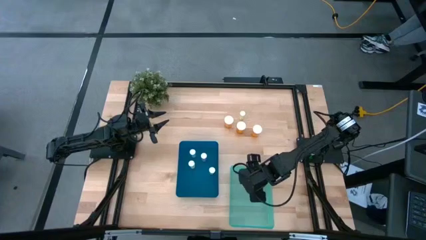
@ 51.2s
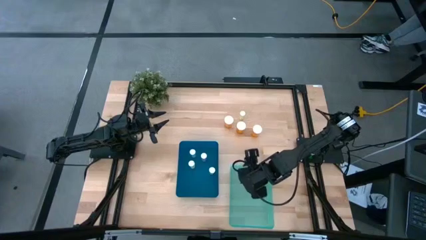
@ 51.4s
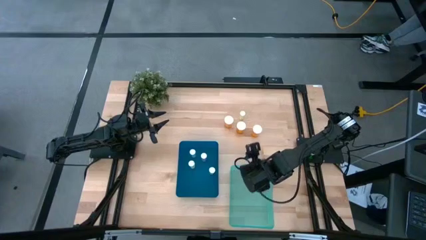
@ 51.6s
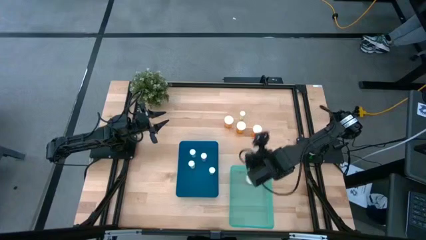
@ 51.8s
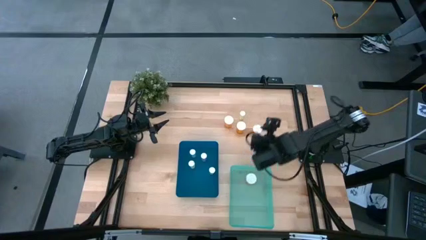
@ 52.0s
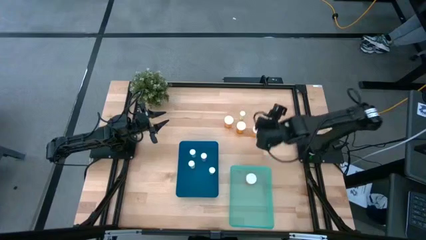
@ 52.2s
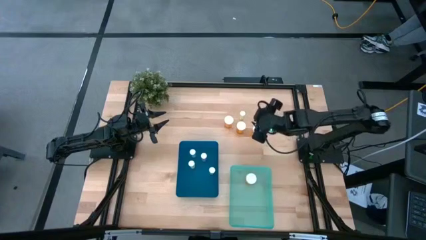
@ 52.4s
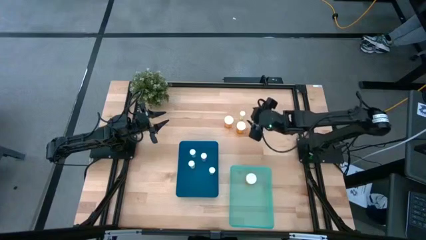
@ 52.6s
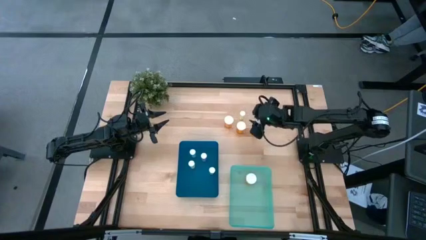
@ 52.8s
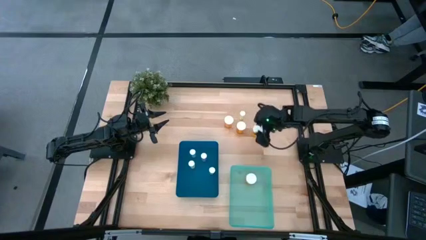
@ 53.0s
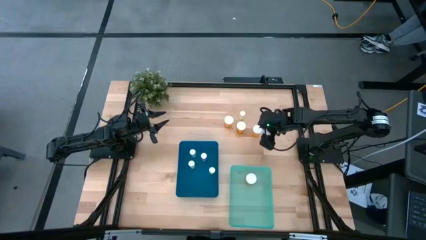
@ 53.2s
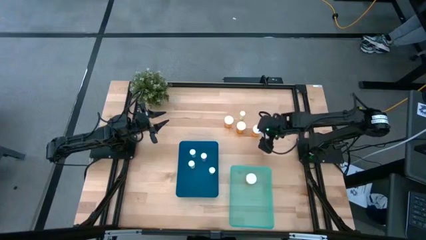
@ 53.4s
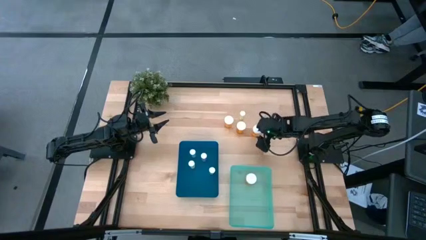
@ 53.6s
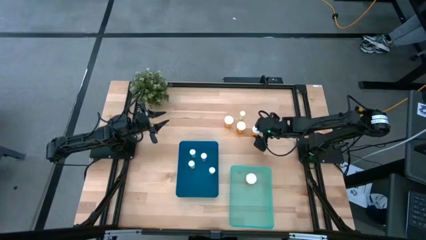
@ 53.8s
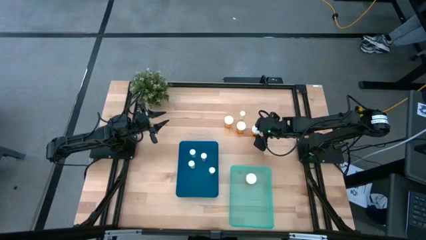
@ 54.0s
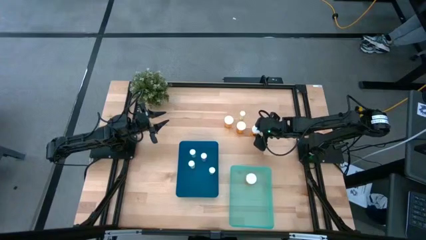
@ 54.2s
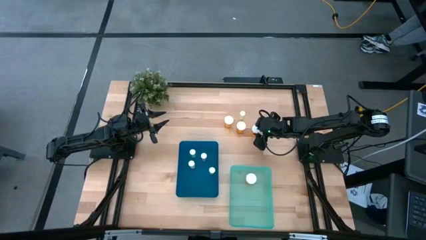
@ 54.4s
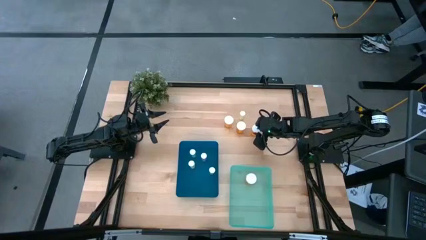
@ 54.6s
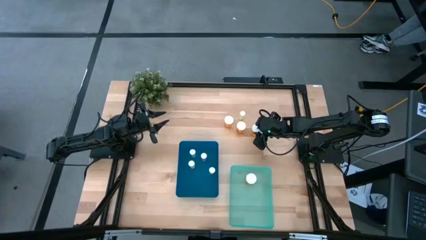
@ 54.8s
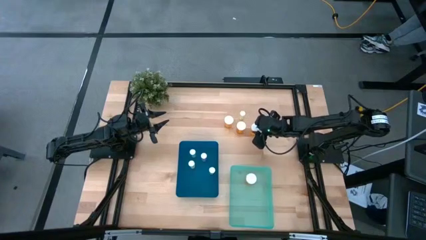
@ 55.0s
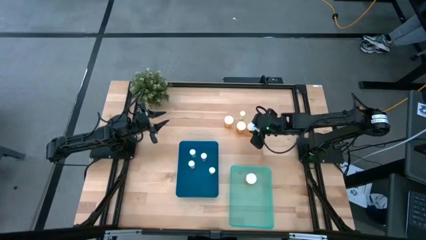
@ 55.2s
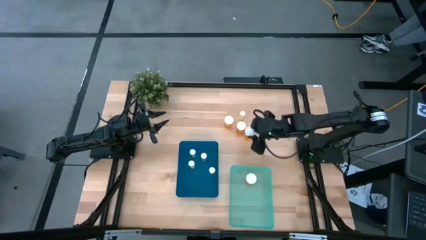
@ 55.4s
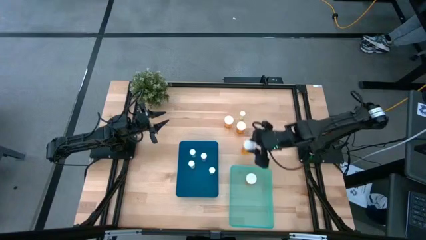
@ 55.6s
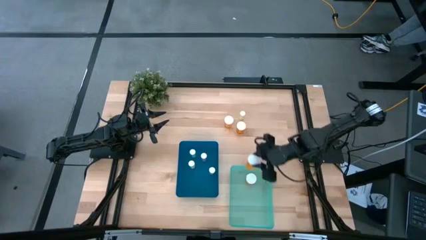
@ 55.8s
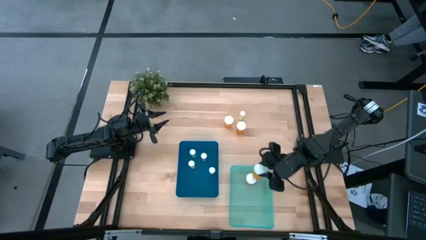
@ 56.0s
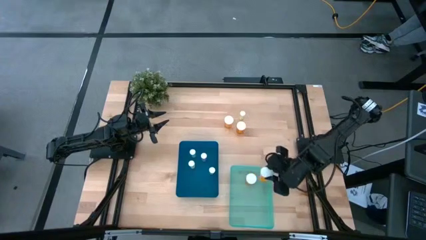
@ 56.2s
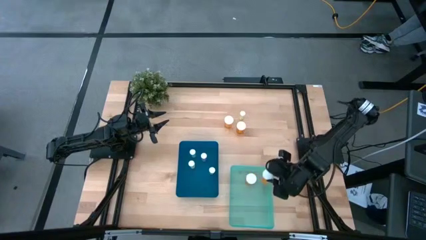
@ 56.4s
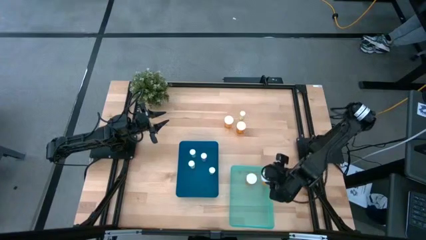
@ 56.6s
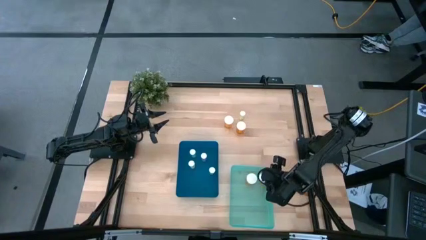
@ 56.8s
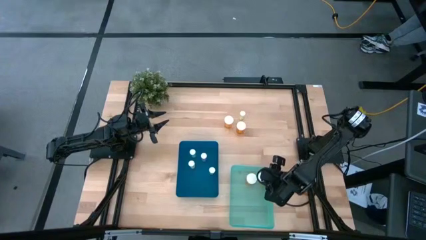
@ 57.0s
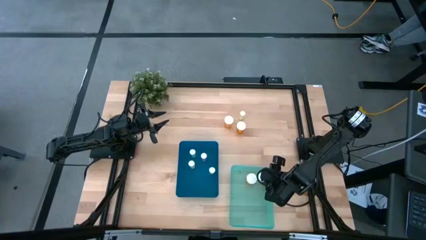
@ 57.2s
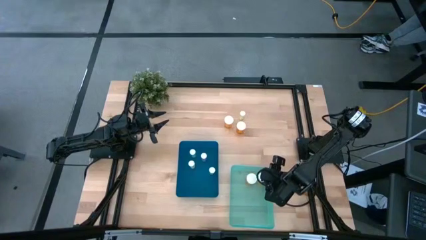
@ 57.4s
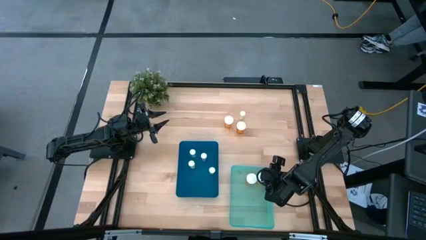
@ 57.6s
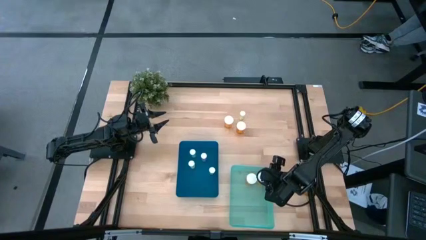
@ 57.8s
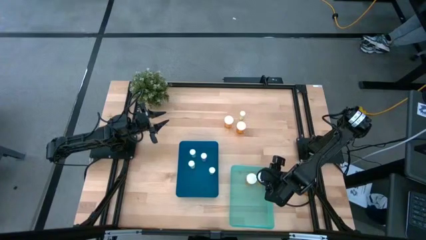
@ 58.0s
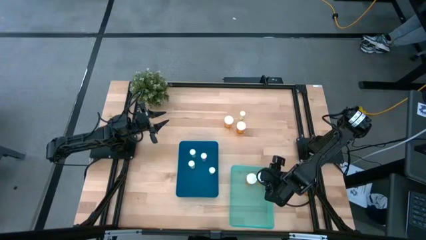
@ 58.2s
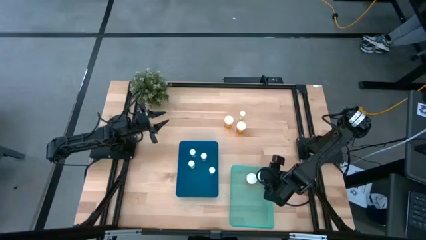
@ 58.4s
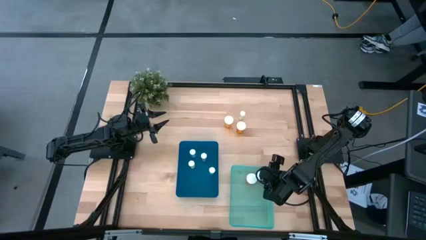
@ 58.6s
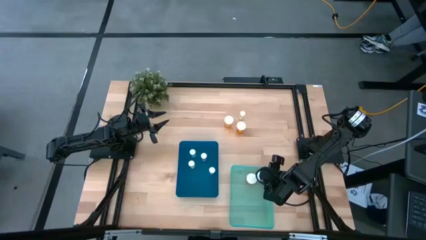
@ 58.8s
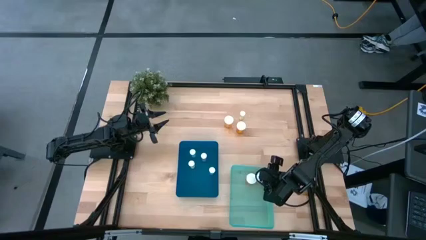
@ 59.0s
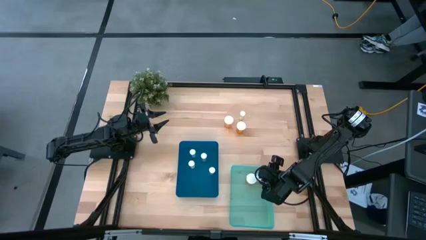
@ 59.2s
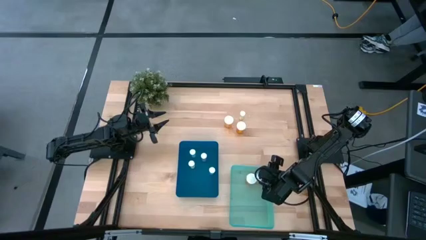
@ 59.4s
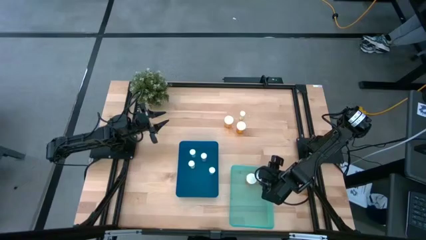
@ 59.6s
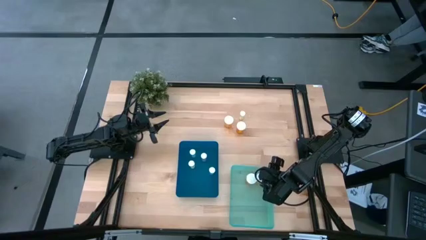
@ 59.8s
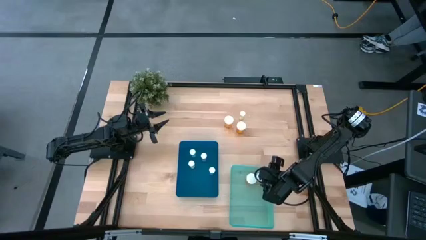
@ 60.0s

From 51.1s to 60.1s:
Task: Pick and place medicine bottles into bin by pill shape (circle, oval)
Put the right orange pill bottle into the light blue bin

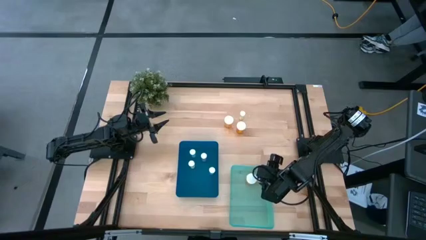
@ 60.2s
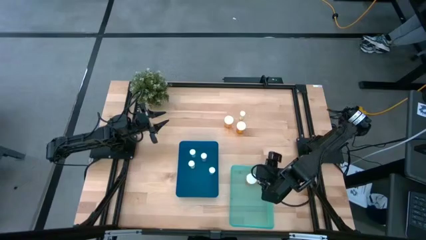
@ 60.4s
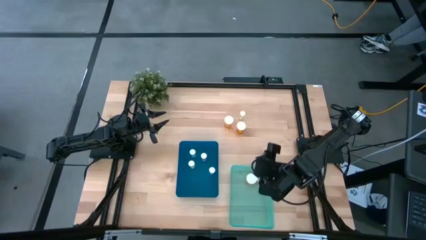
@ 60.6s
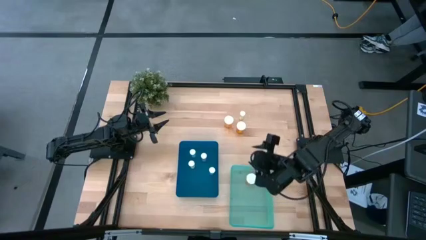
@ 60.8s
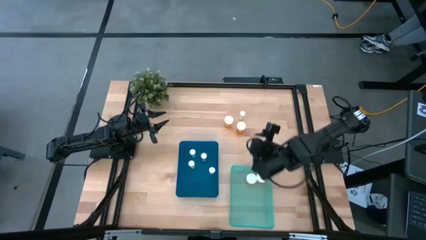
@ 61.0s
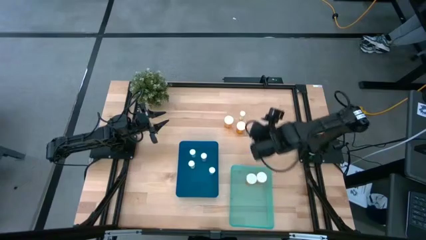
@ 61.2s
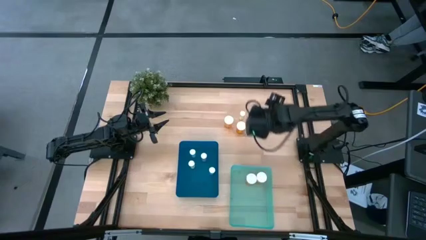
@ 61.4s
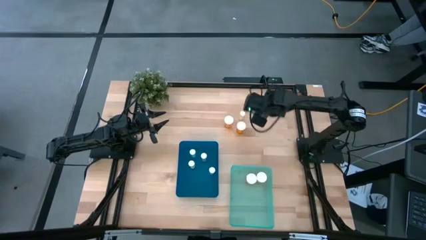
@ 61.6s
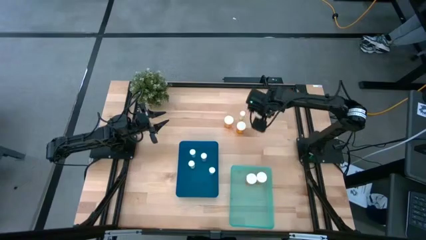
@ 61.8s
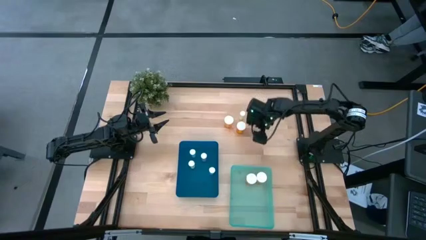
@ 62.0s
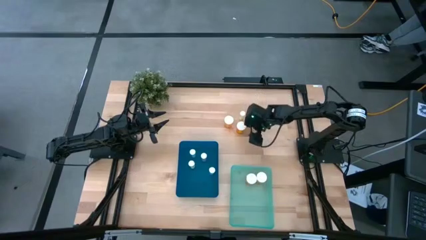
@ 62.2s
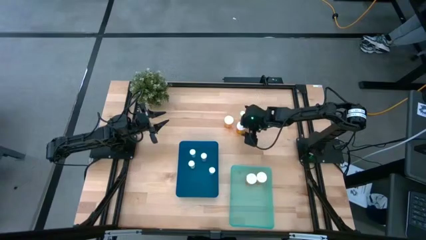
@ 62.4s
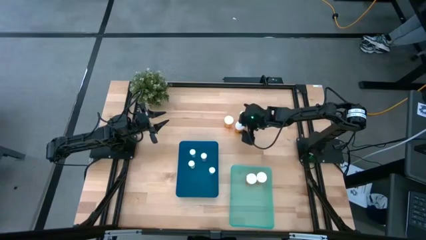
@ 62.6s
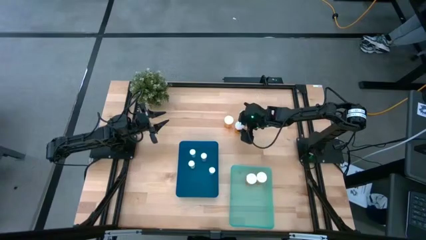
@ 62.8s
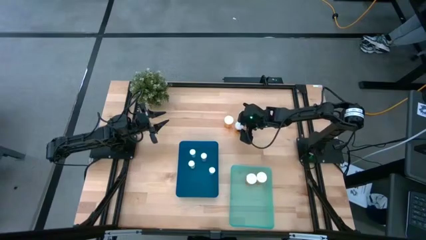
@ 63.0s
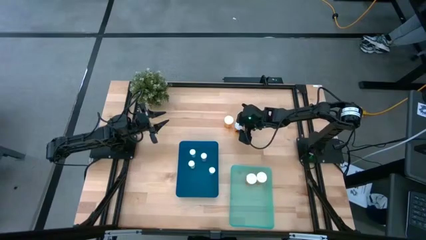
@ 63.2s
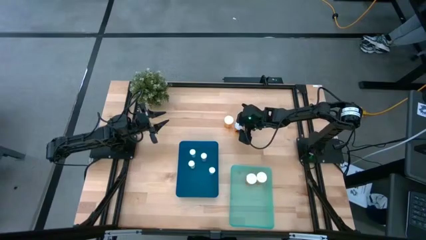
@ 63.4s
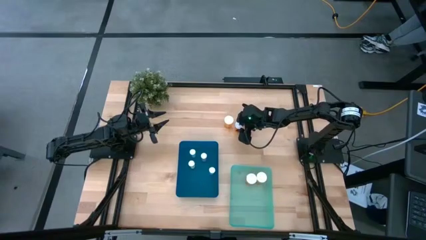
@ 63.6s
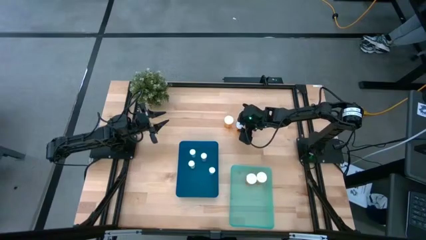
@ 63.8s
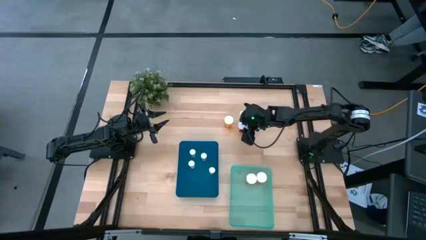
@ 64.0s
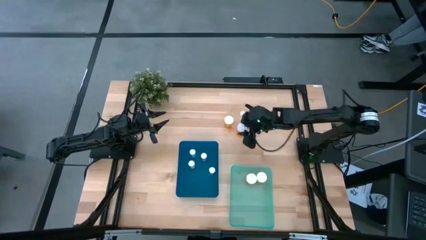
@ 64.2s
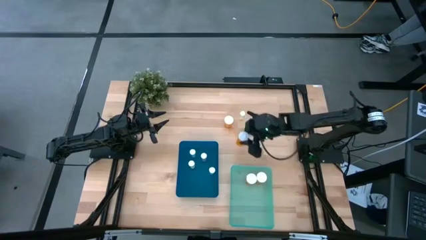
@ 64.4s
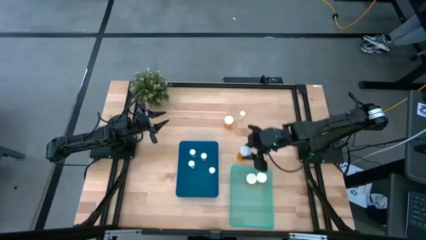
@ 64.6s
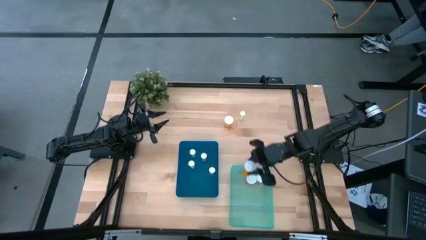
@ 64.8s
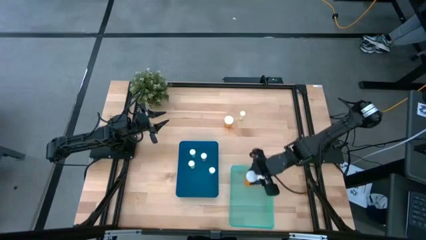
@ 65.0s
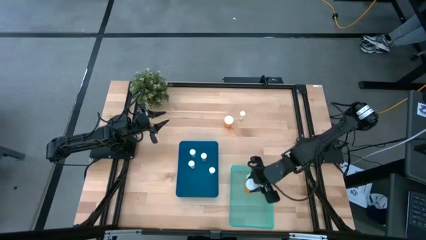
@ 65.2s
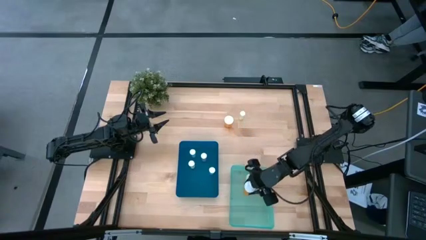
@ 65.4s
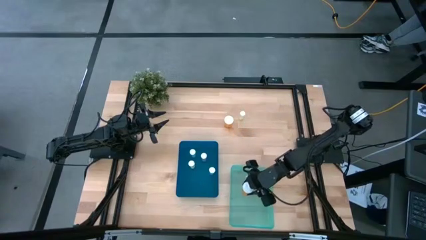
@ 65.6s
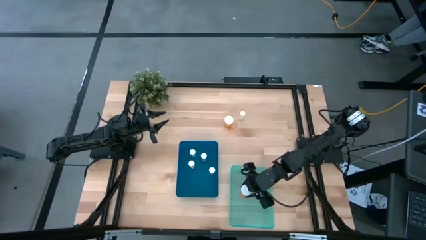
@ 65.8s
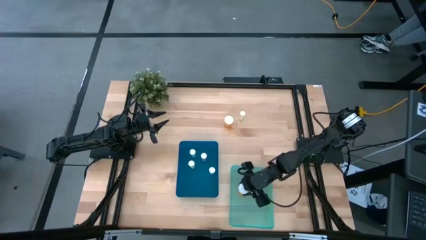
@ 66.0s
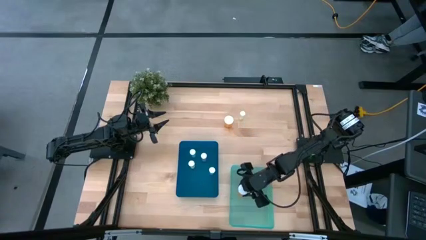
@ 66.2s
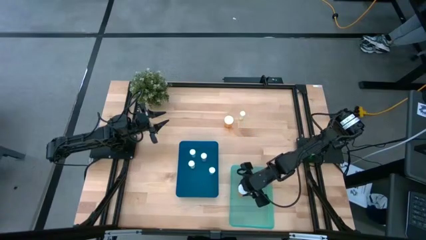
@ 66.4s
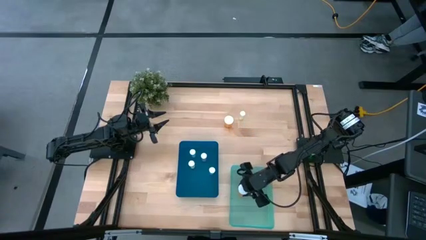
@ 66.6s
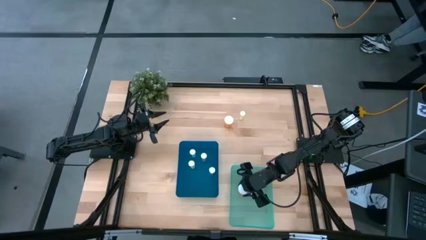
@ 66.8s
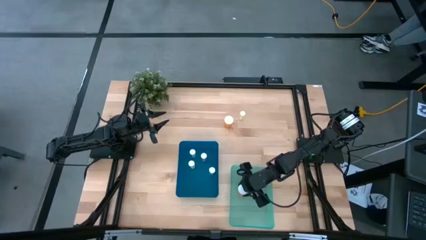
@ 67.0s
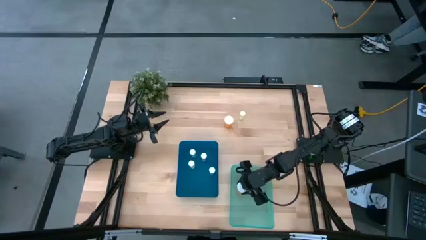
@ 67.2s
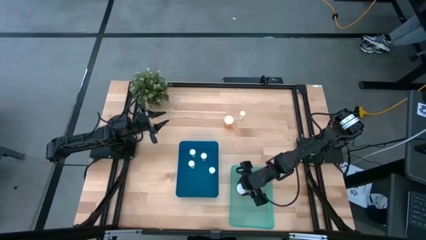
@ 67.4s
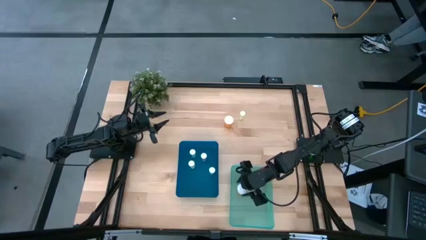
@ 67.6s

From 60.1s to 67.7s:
Put the right orange pill bottle into the light blue bin
